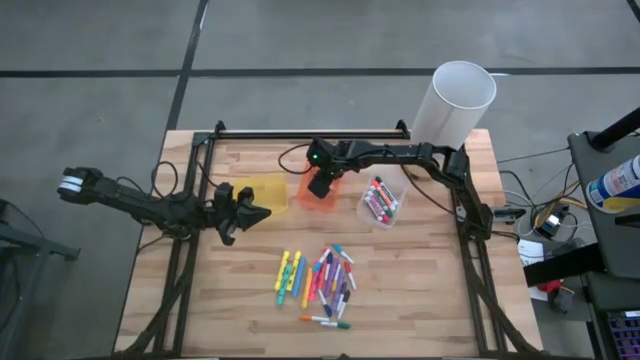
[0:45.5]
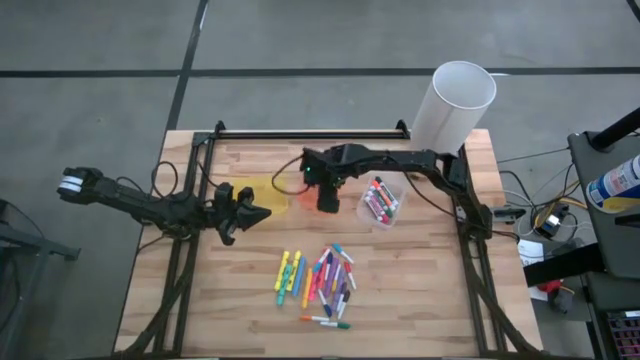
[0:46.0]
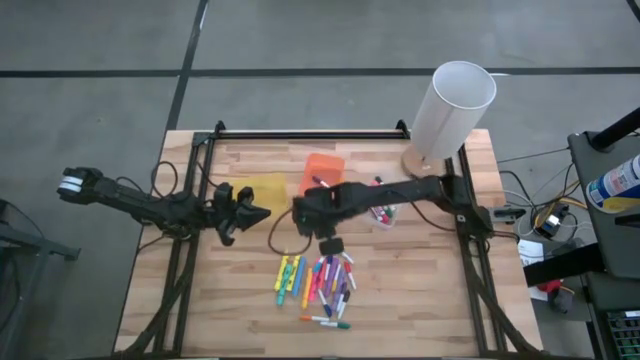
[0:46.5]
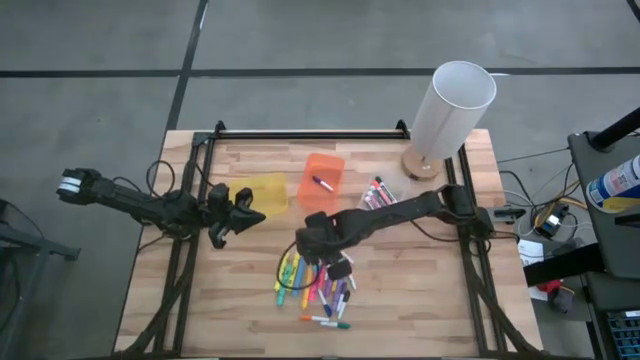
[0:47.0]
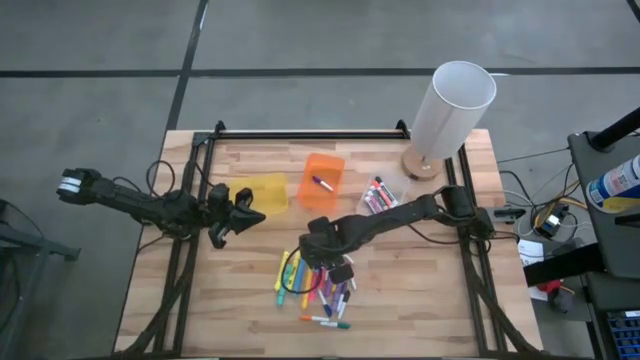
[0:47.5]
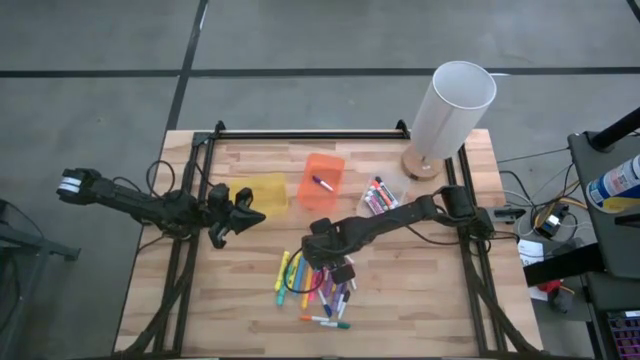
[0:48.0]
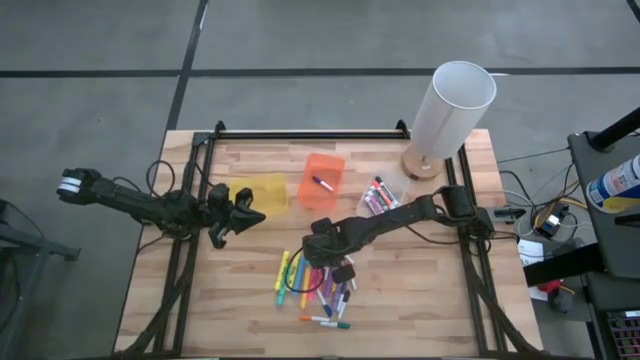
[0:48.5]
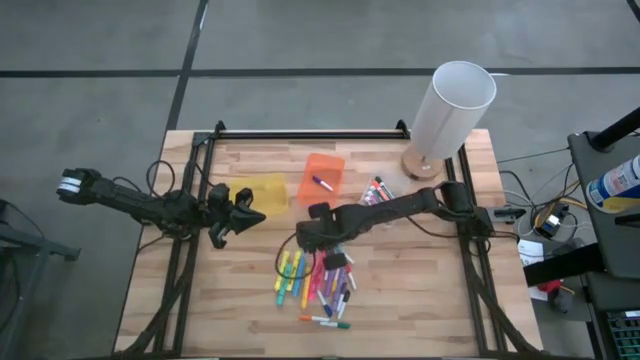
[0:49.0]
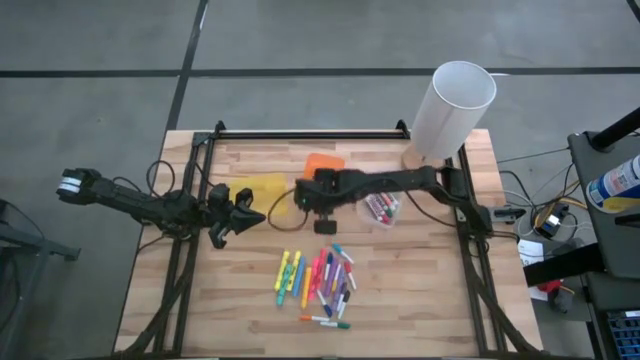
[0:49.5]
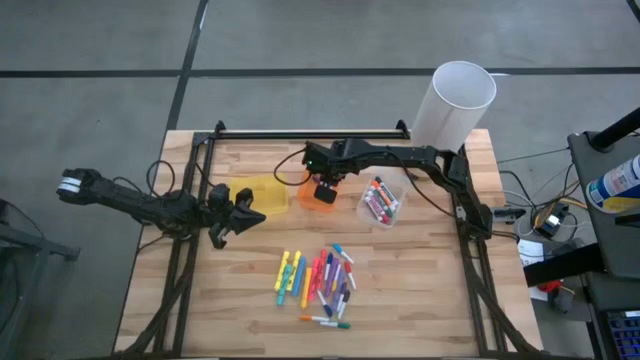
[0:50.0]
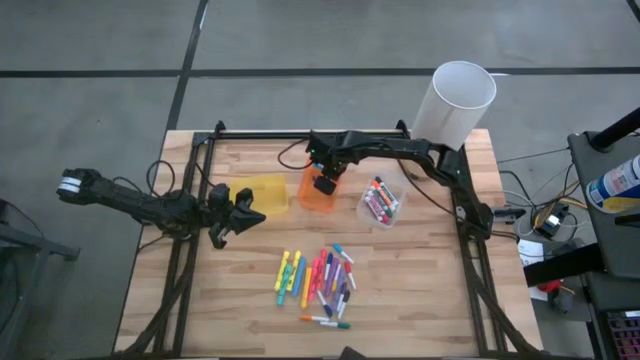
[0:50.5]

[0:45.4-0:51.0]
Task: Pick & Place Markers
Put the left light blue pen into the orange bin

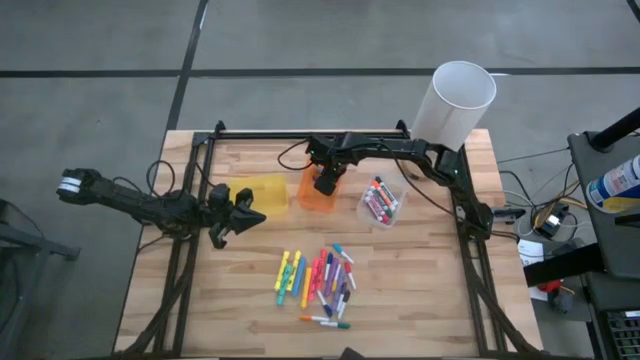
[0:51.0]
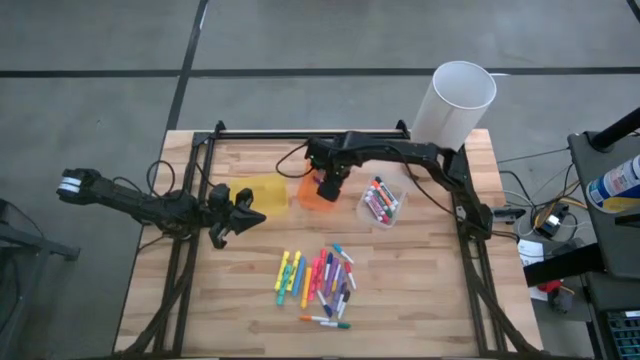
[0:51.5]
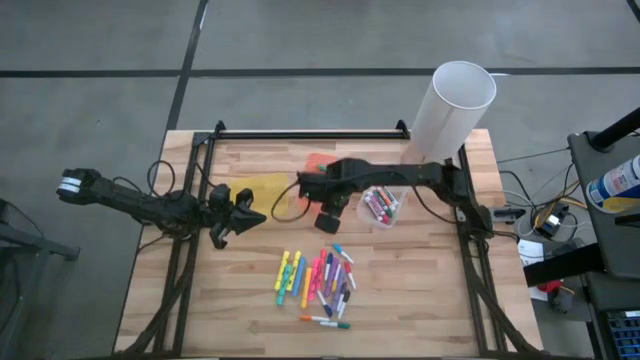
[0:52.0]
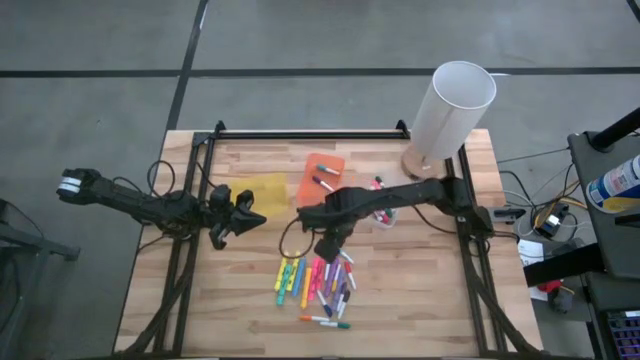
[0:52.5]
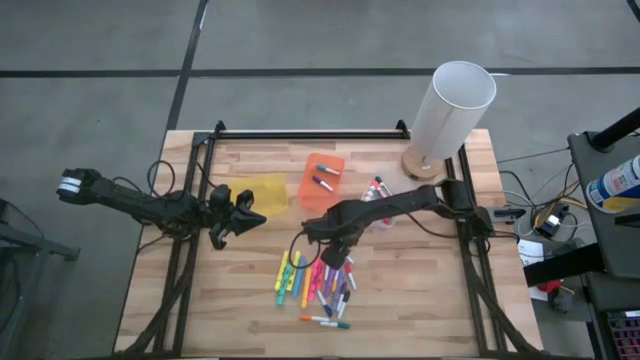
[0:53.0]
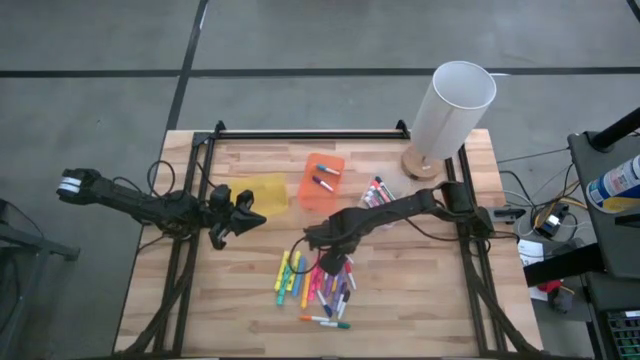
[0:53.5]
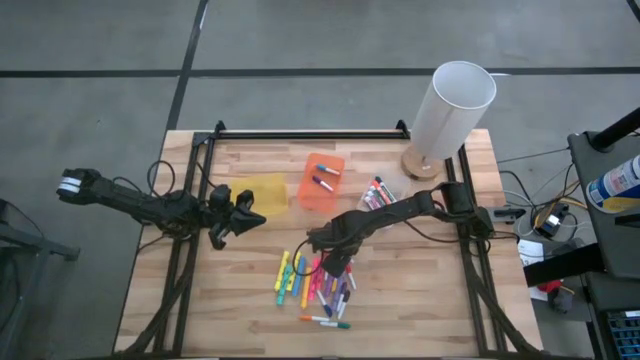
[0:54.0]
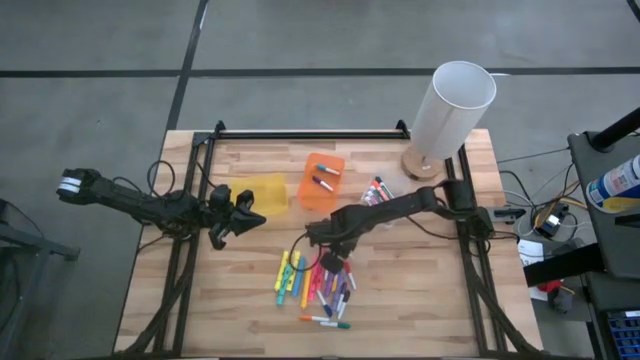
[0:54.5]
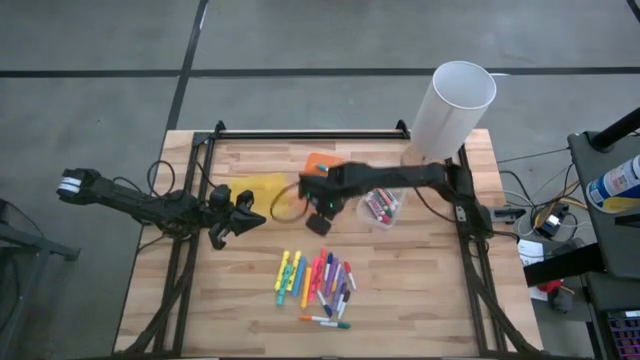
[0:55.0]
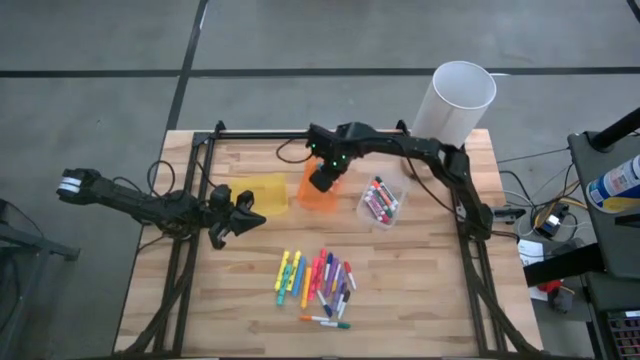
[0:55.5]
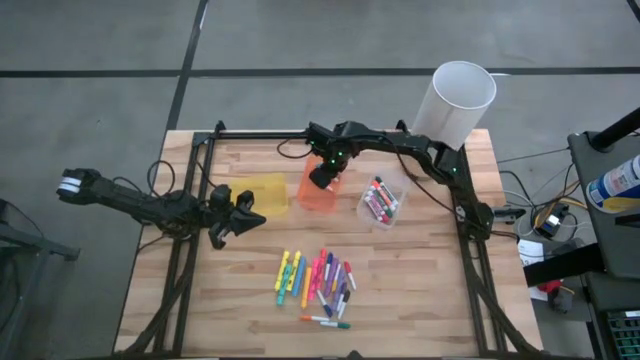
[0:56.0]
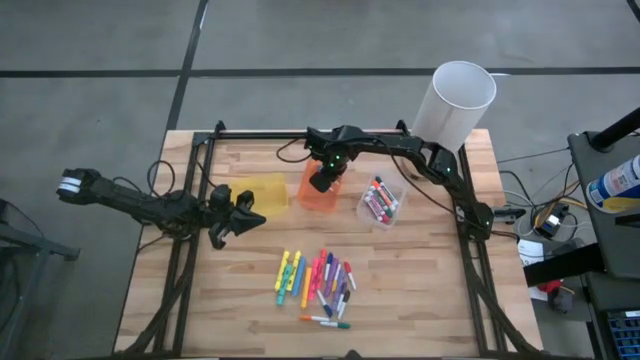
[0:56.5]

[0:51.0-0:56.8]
Put the light blue pen into the orange bin

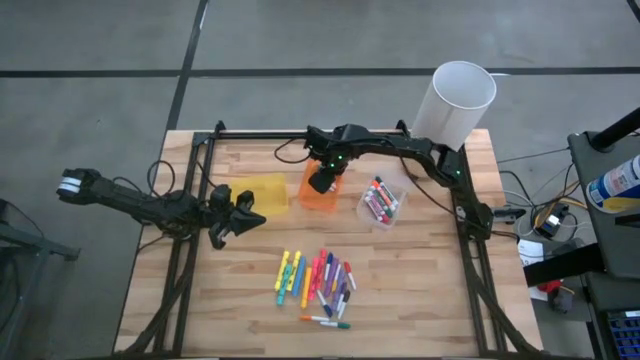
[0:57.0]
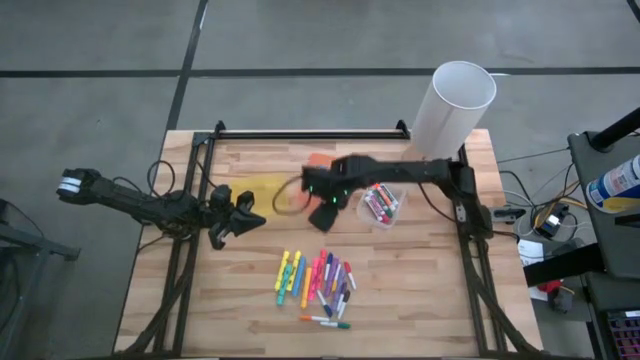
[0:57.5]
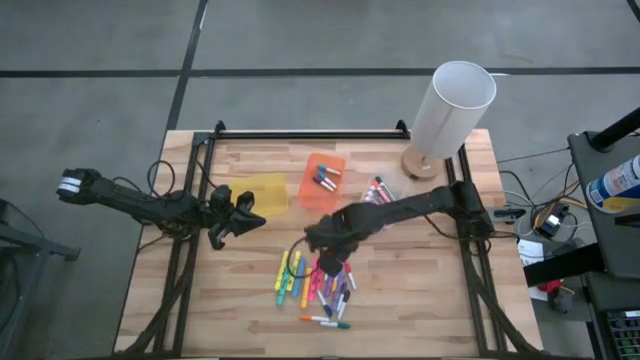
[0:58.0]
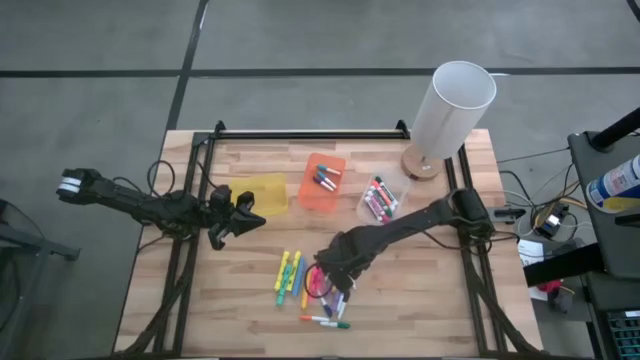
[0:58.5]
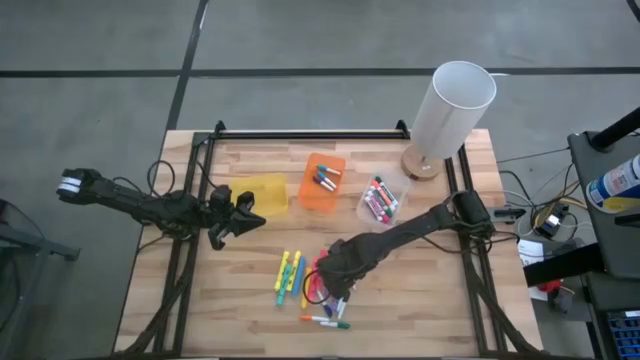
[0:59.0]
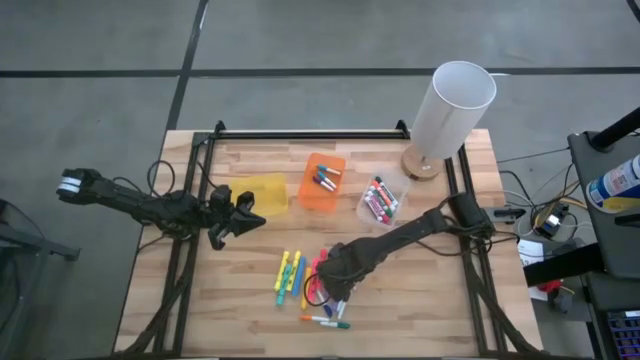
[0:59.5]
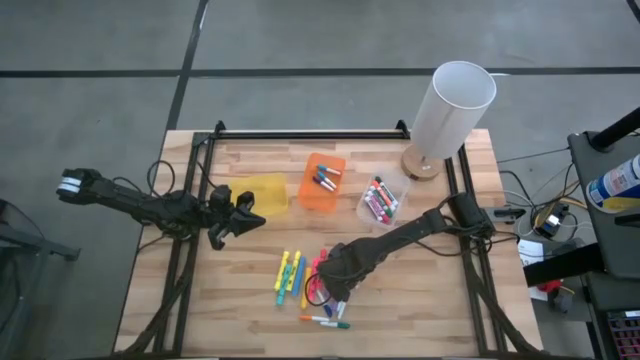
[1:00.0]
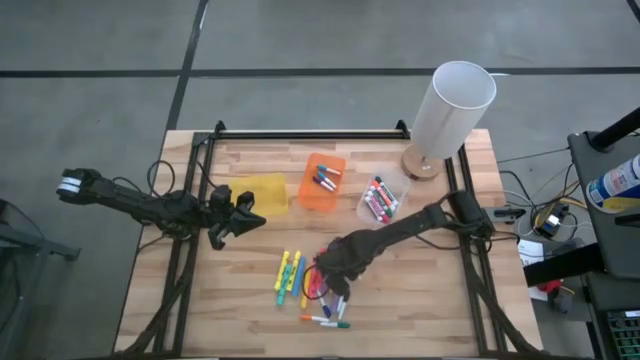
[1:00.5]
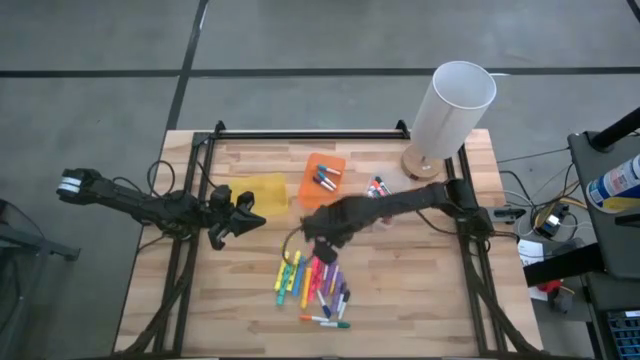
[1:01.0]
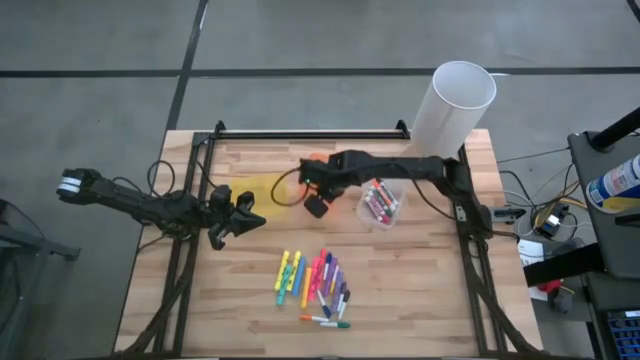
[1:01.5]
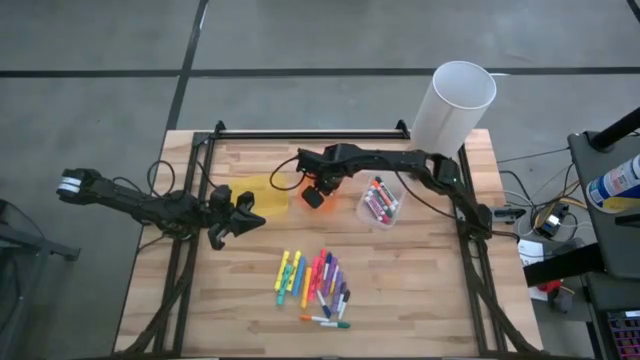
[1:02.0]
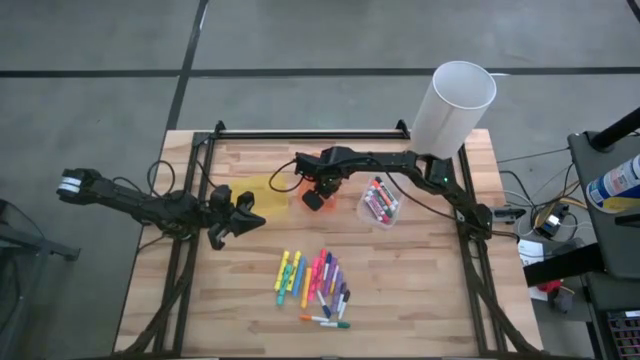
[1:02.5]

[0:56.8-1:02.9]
Put the red pen into the orange bin

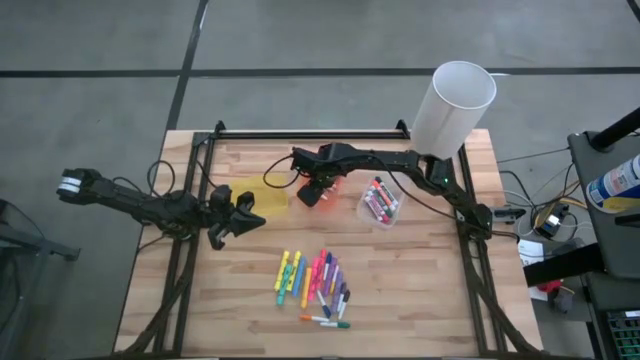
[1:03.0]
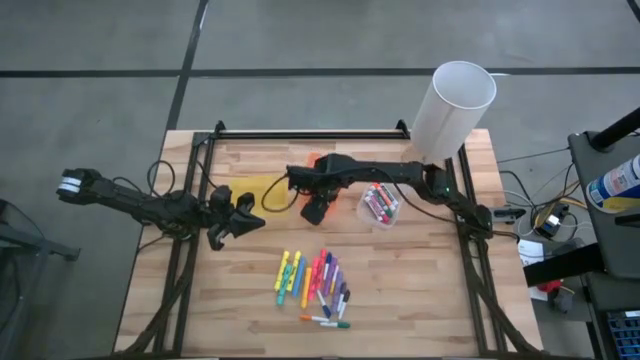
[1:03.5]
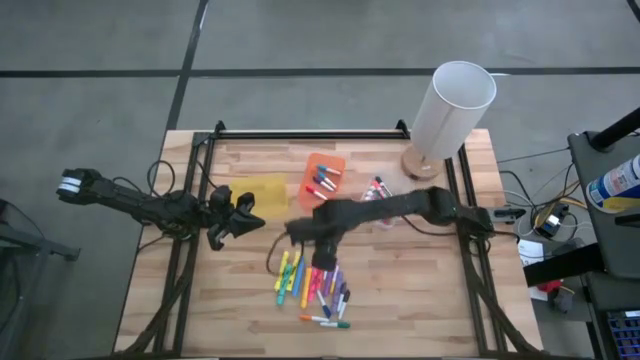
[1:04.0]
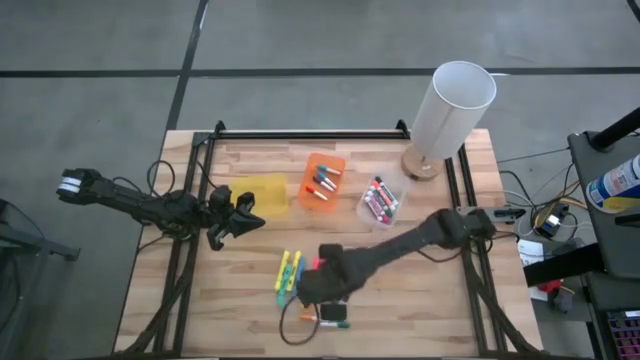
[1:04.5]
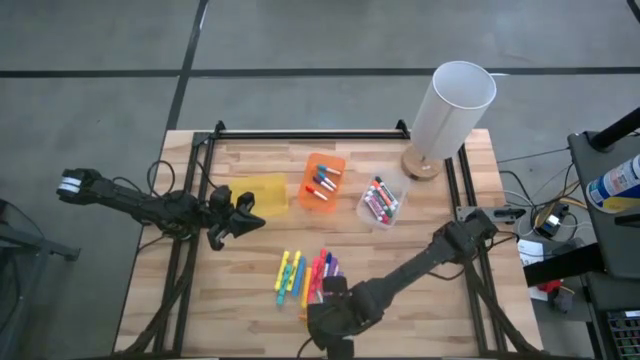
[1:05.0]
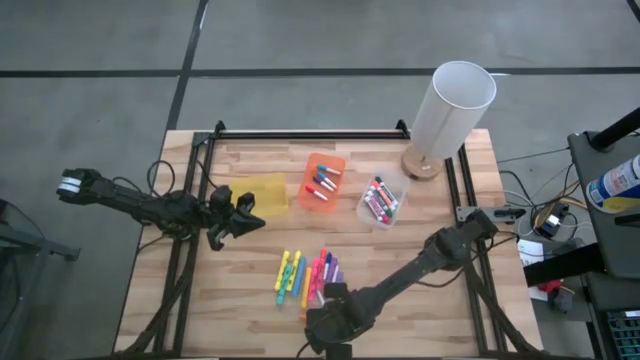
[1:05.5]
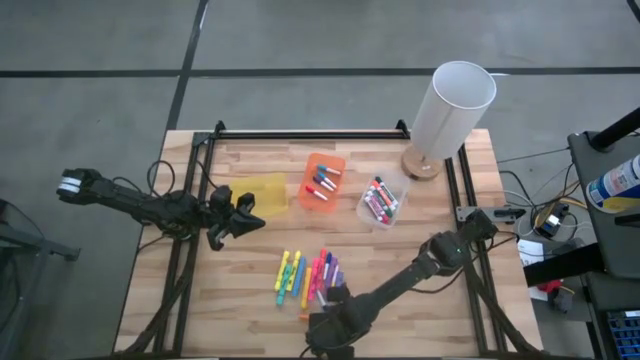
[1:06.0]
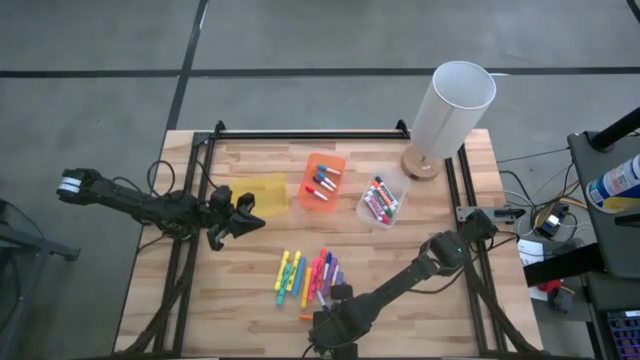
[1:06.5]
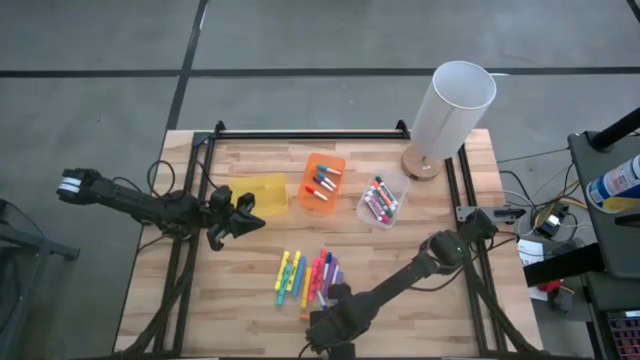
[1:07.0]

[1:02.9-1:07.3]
Put the green pen into the orange bin
